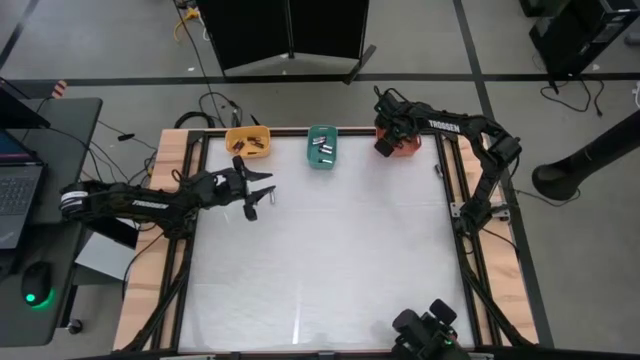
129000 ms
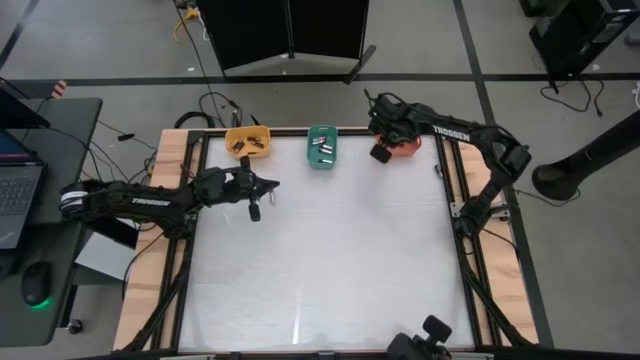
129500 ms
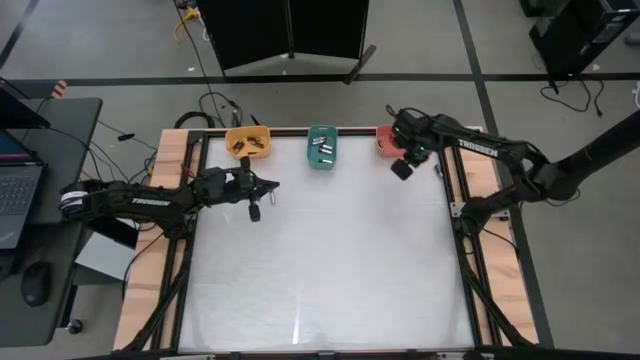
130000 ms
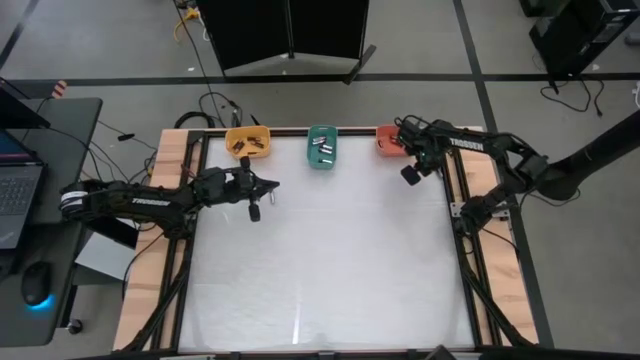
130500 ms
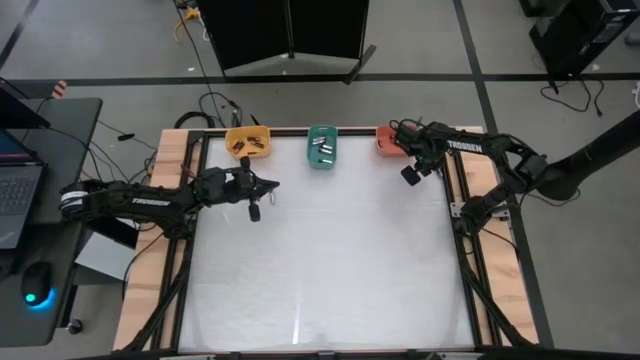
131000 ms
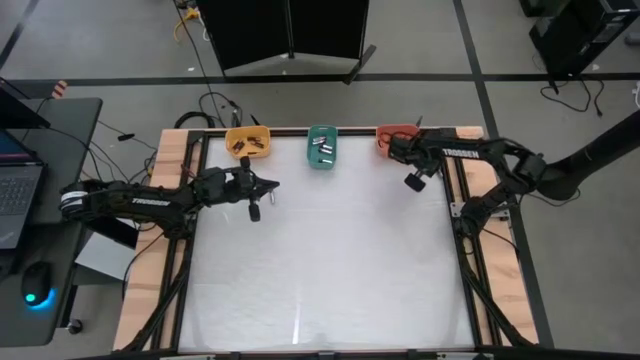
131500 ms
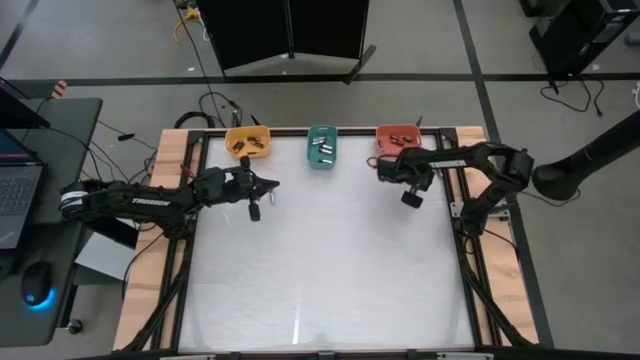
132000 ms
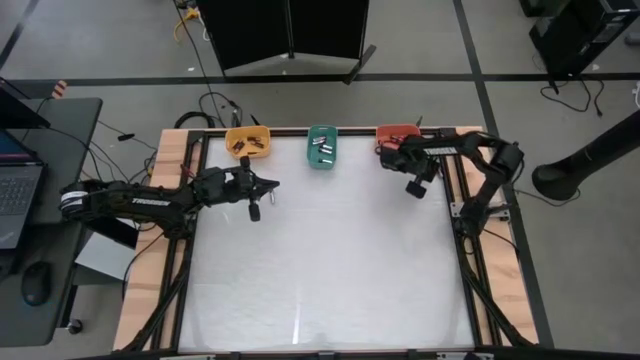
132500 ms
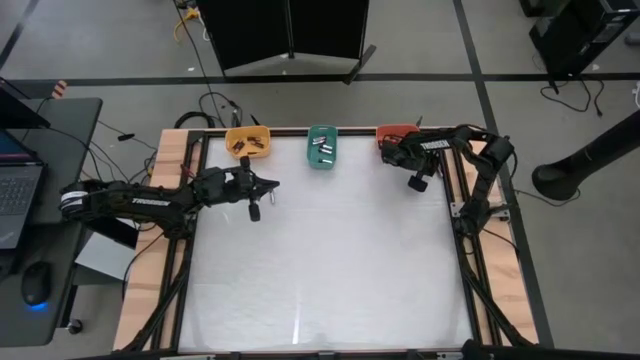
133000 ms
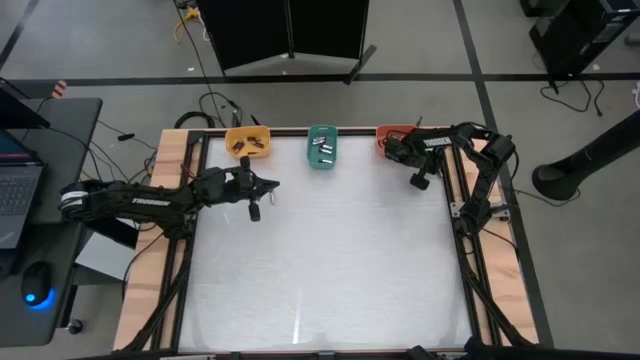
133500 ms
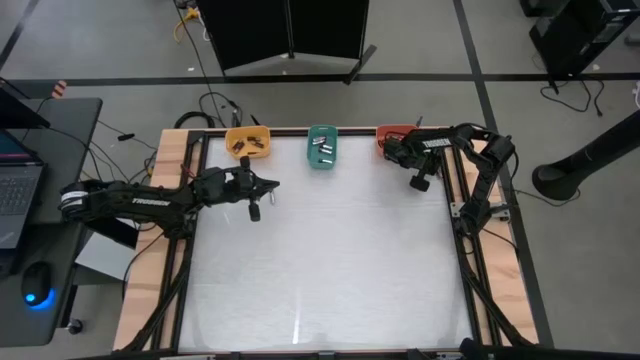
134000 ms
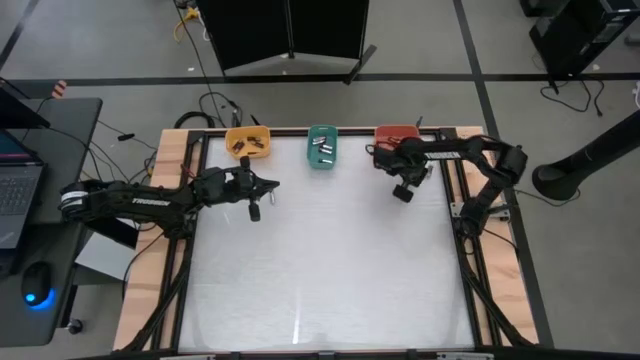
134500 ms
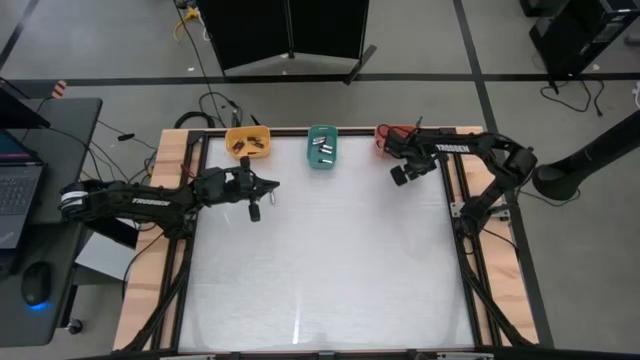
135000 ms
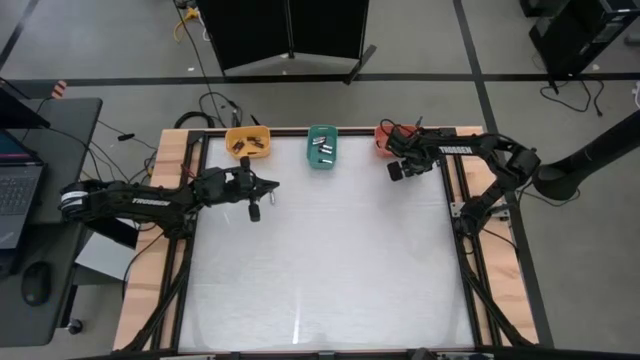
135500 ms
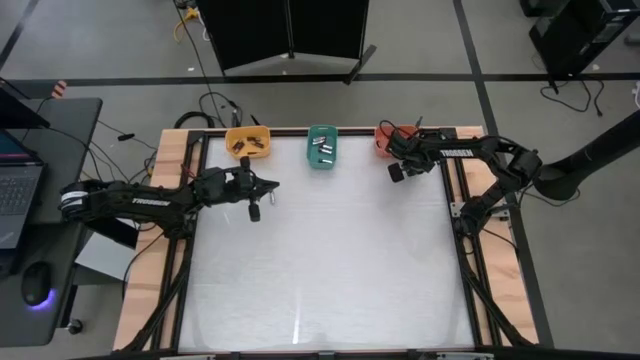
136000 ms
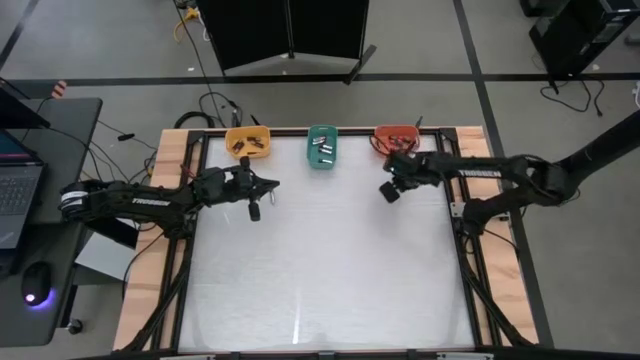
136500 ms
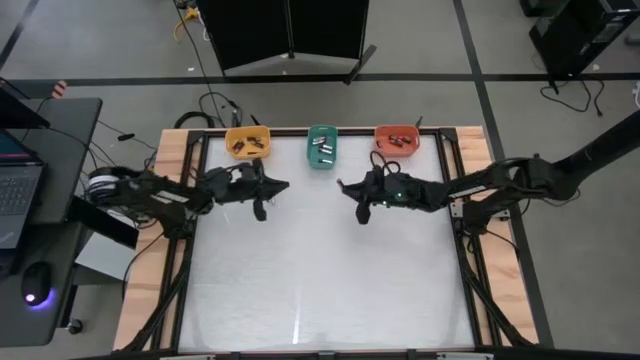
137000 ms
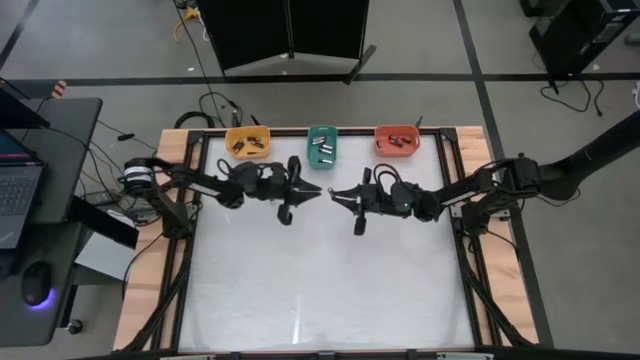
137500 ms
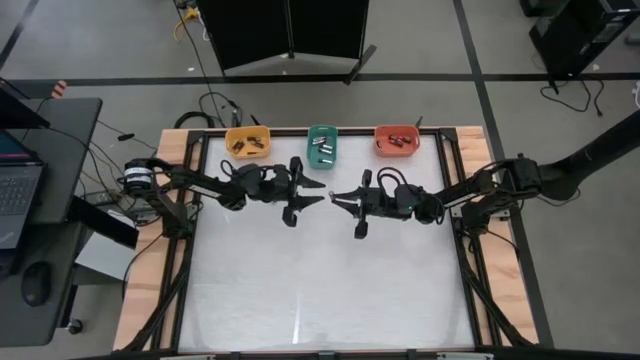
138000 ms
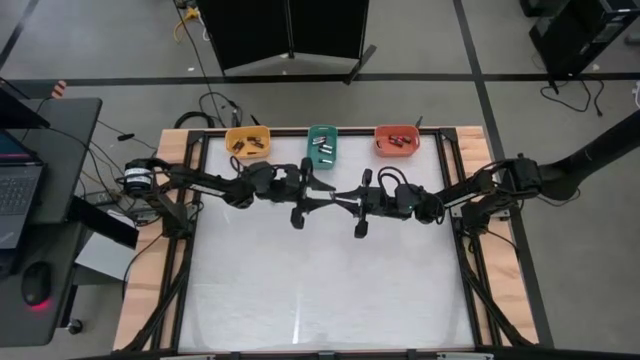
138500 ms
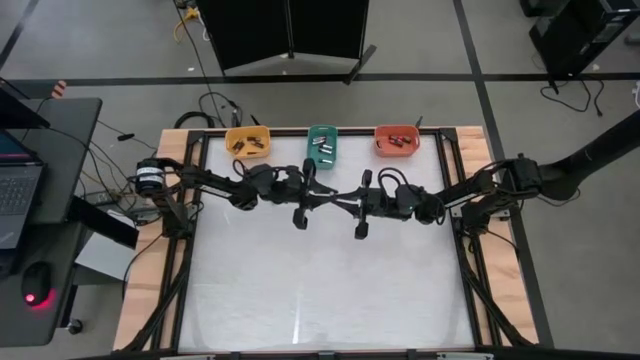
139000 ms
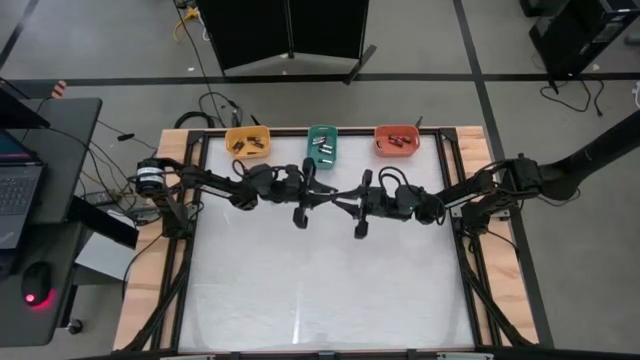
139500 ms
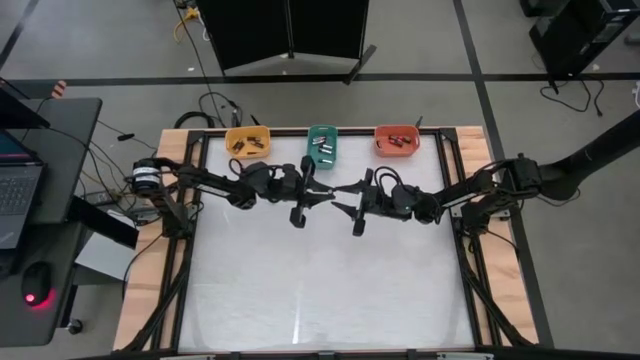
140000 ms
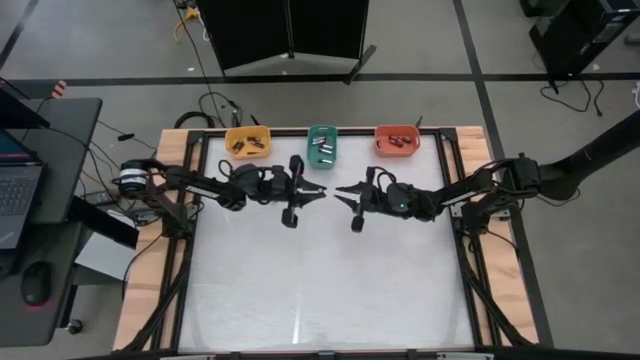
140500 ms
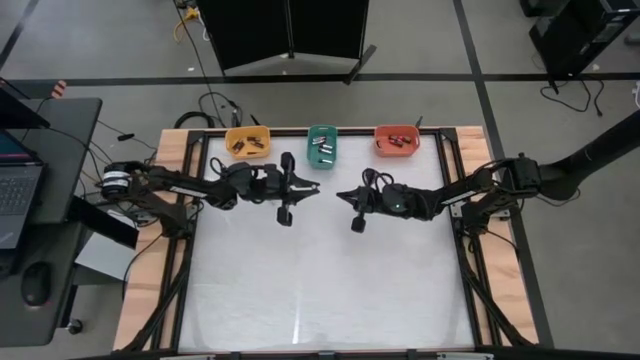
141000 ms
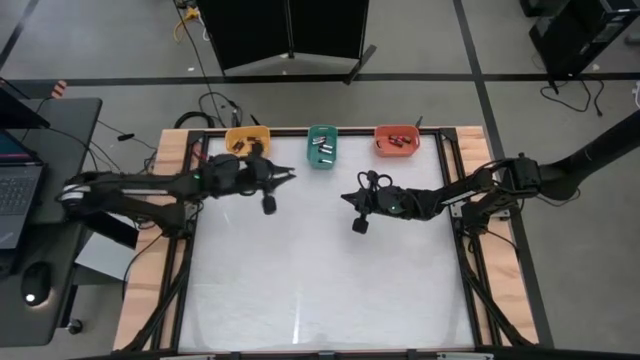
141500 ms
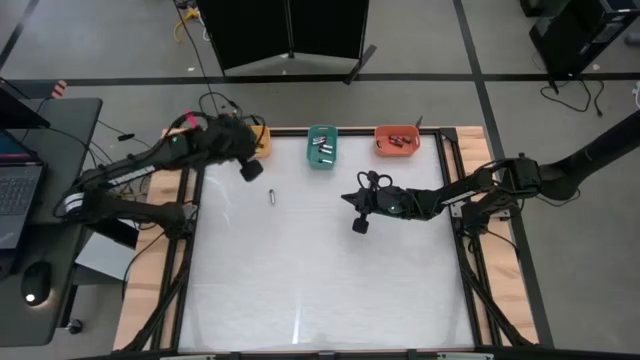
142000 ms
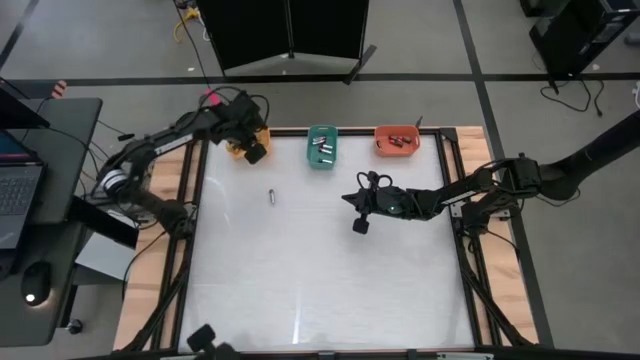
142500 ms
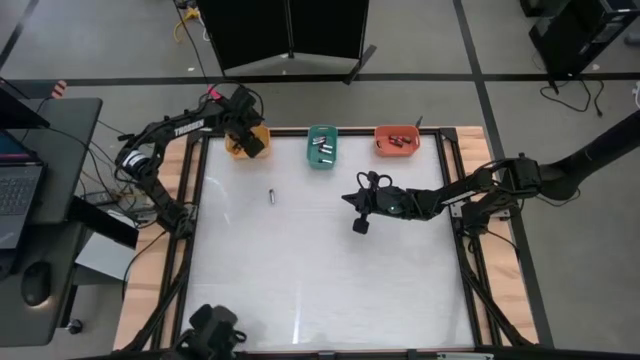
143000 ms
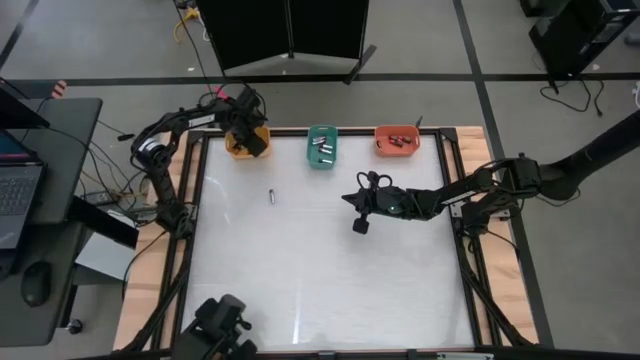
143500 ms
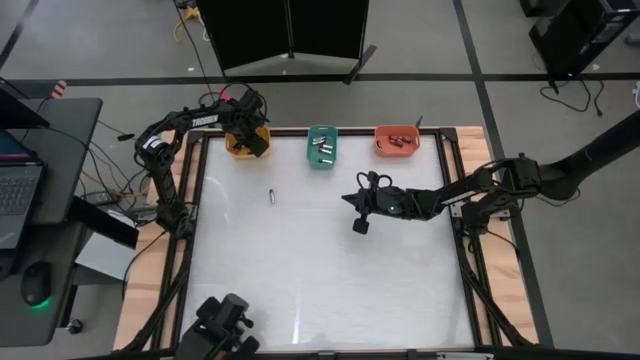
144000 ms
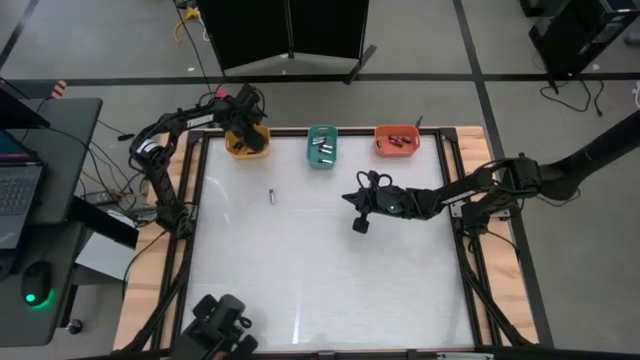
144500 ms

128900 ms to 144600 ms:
Task: Sort batteries
Put the black battery into the yellow bin

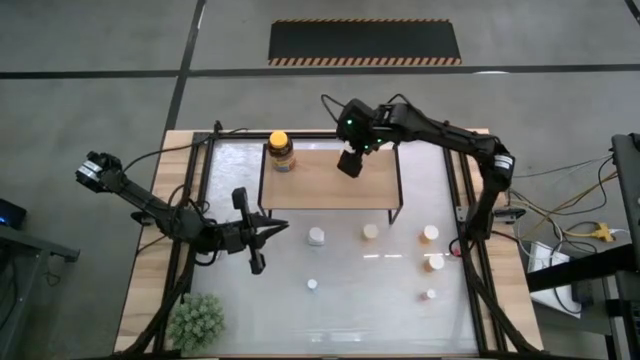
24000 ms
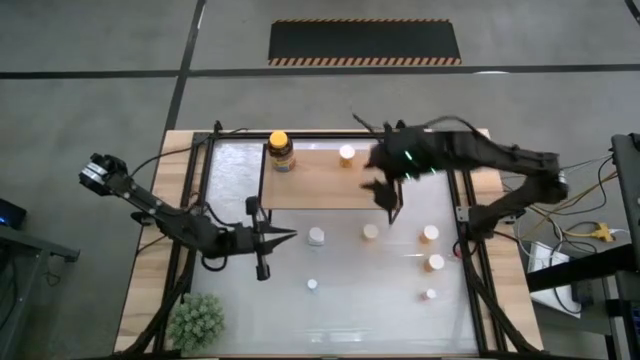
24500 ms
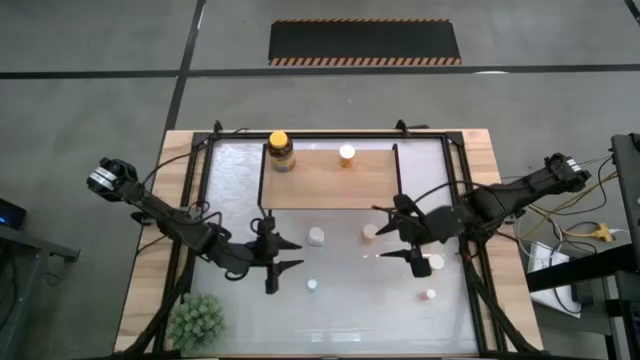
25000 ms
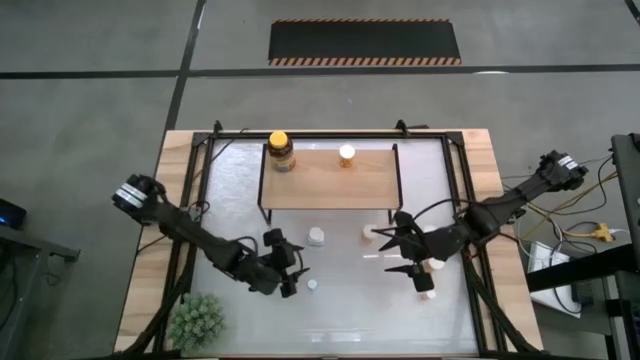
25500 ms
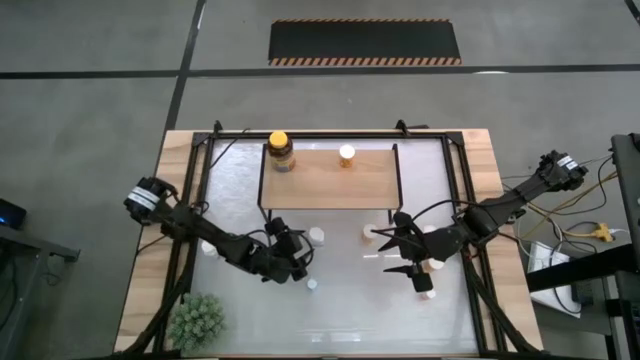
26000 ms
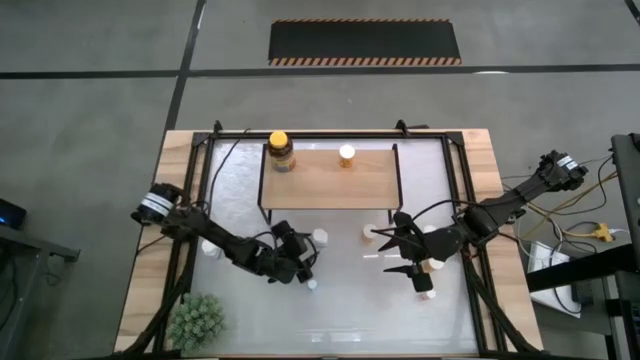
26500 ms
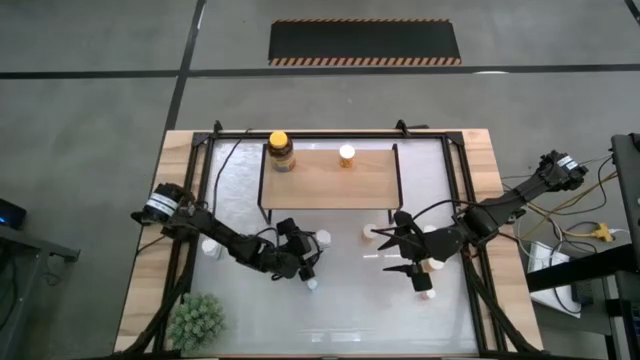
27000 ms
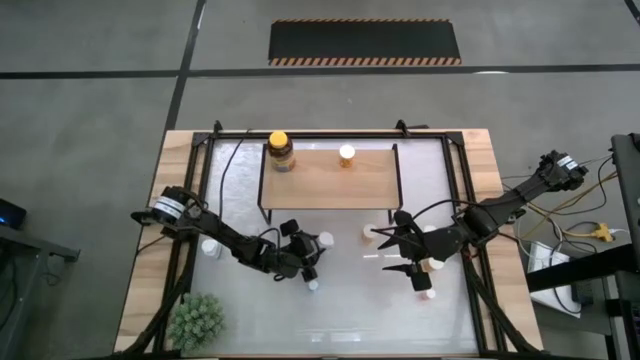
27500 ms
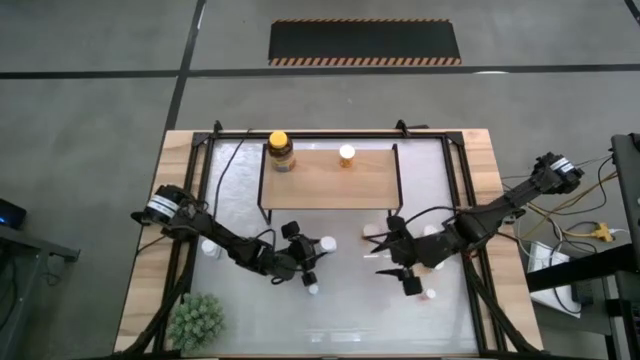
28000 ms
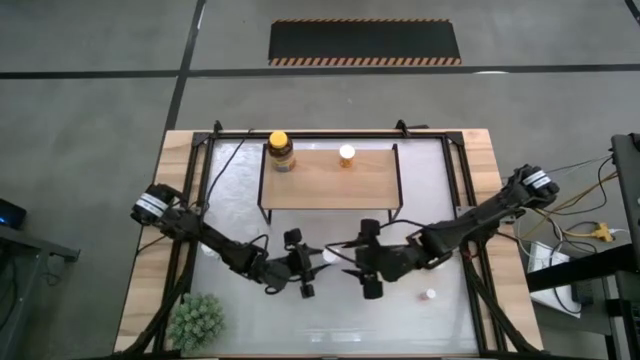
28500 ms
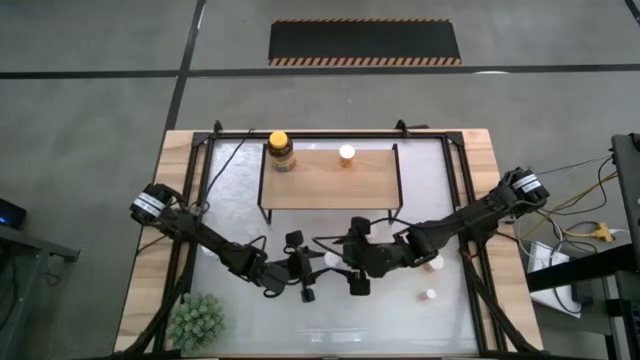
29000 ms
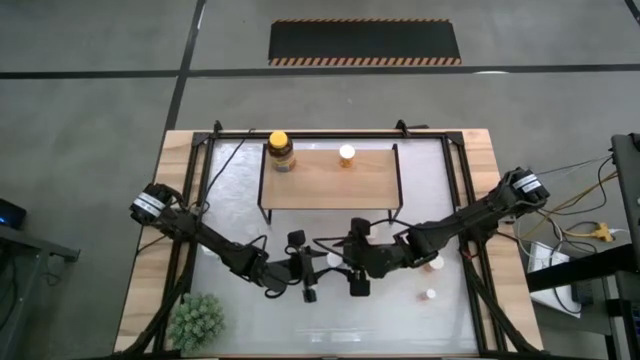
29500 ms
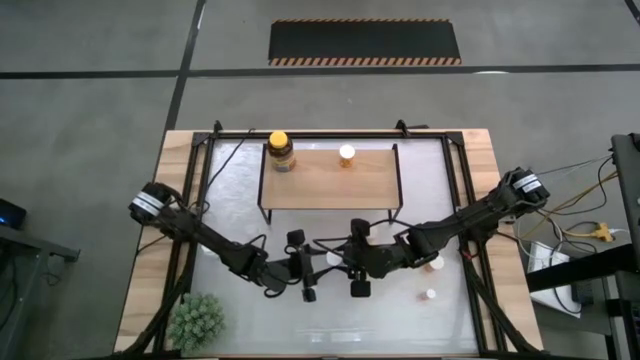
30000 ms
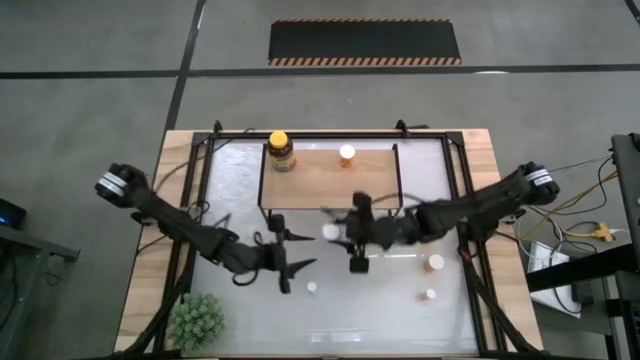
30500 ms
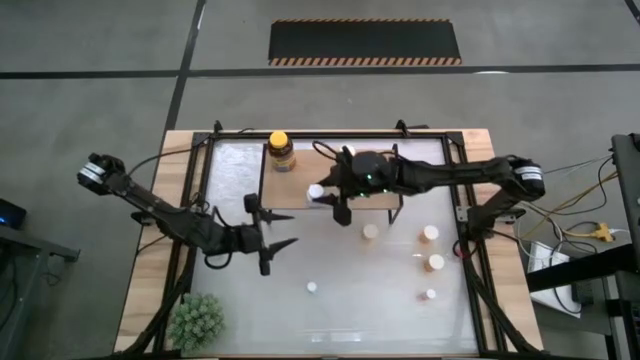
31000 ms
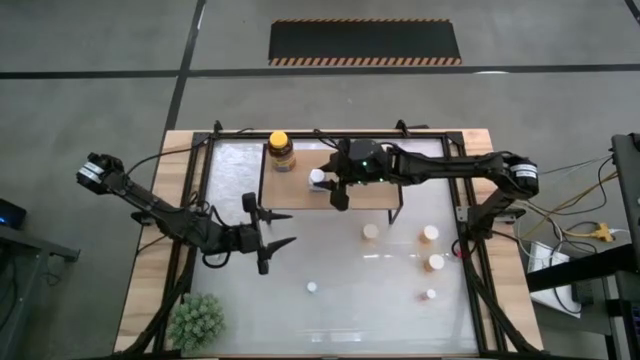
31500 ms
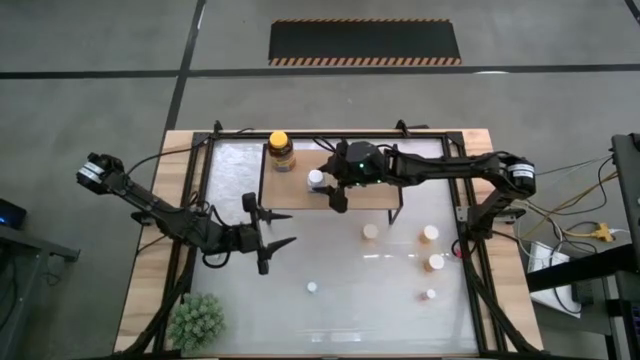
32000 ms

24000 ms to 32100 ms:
Task: Pick and place medicine bottles onto shelf by color
Put the white blue pill bottle on the shelf
